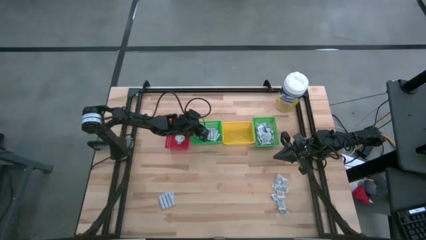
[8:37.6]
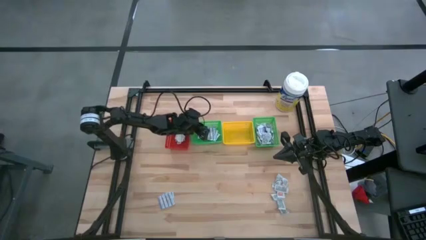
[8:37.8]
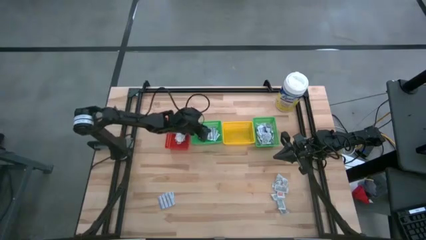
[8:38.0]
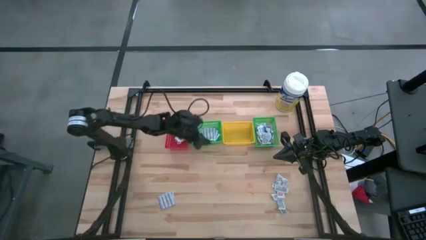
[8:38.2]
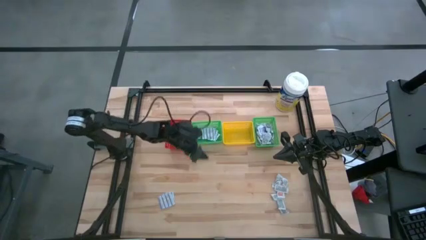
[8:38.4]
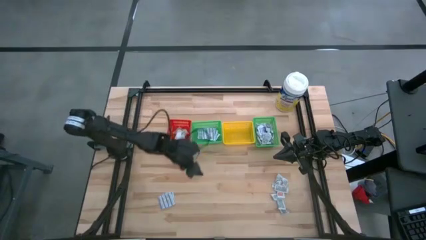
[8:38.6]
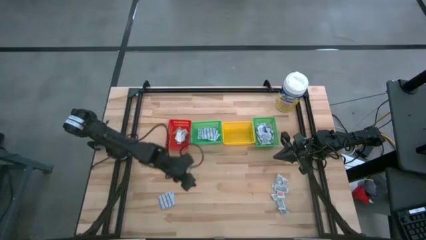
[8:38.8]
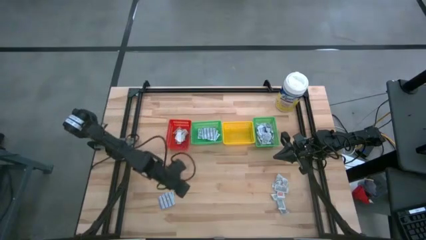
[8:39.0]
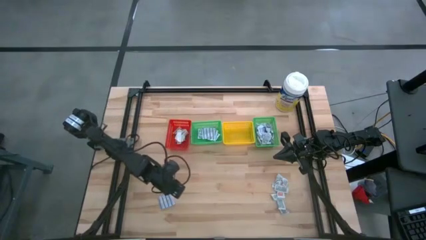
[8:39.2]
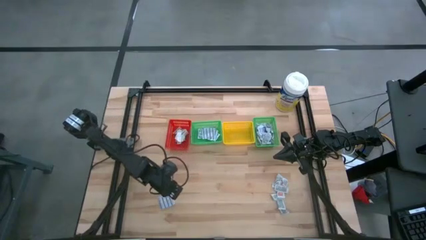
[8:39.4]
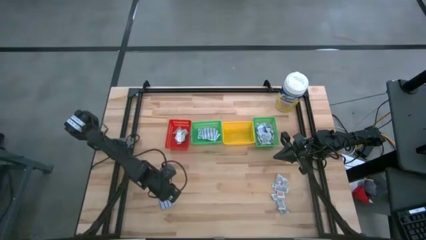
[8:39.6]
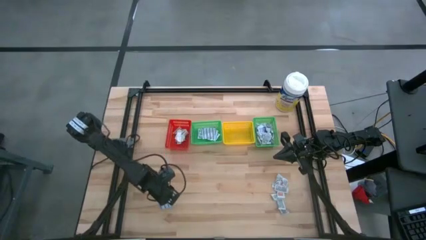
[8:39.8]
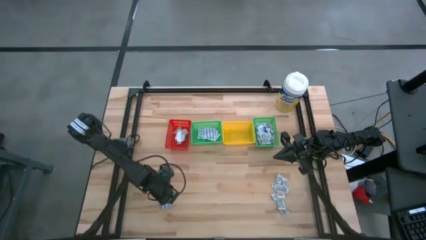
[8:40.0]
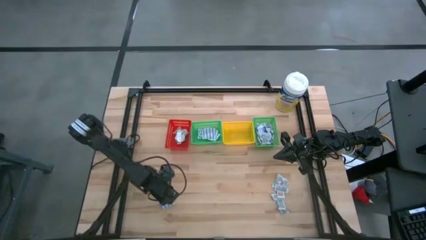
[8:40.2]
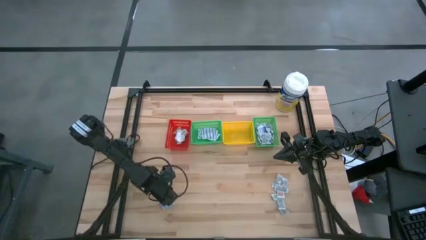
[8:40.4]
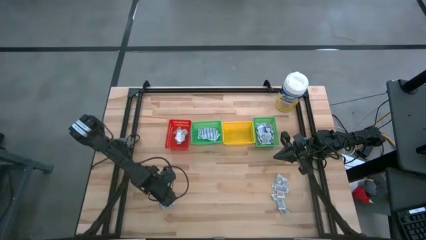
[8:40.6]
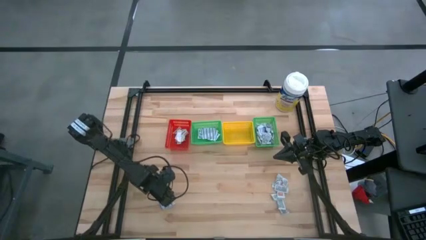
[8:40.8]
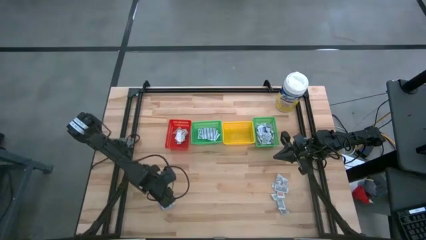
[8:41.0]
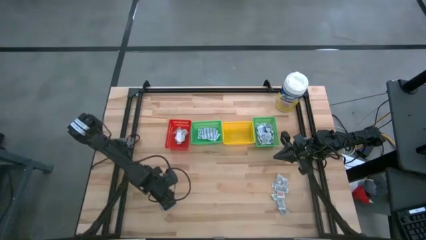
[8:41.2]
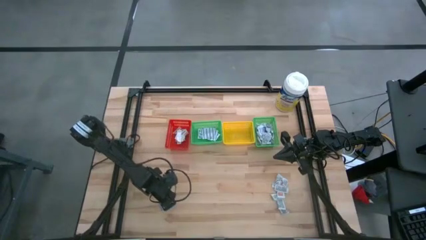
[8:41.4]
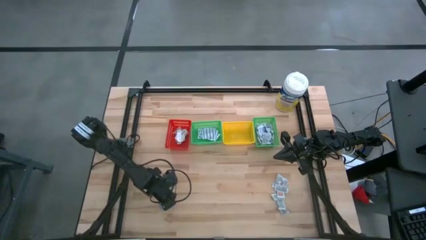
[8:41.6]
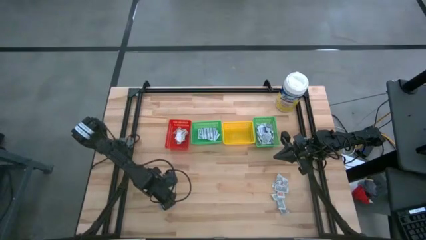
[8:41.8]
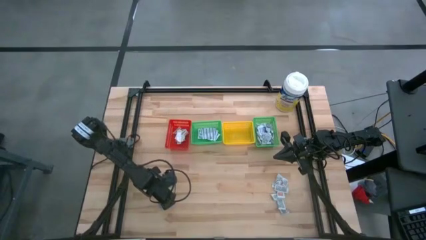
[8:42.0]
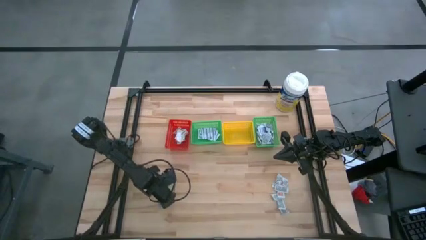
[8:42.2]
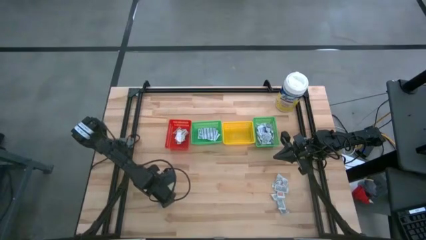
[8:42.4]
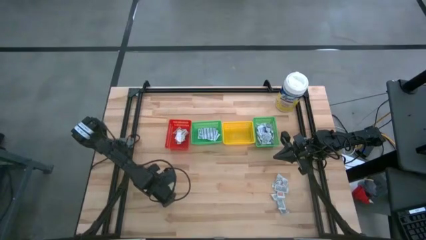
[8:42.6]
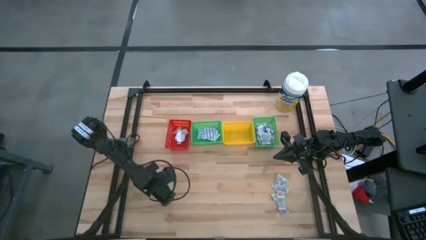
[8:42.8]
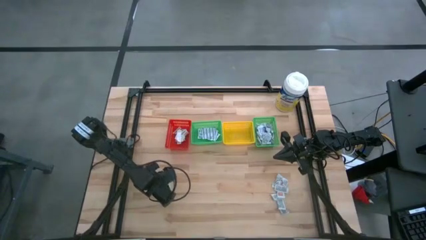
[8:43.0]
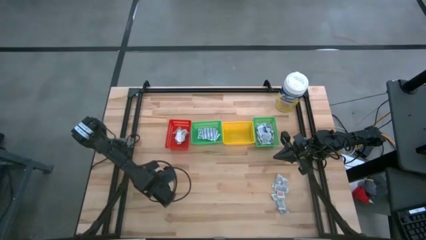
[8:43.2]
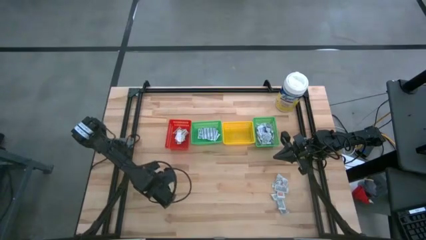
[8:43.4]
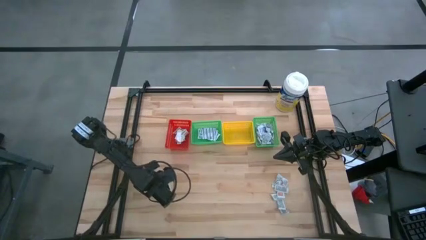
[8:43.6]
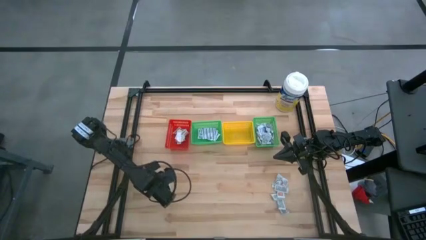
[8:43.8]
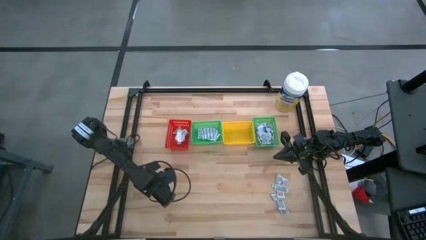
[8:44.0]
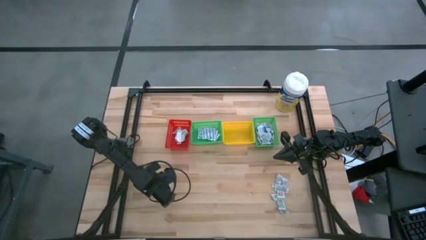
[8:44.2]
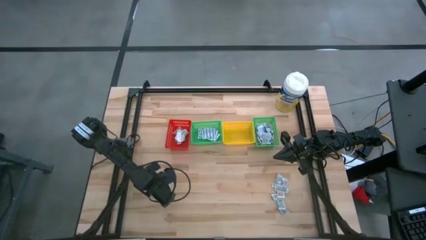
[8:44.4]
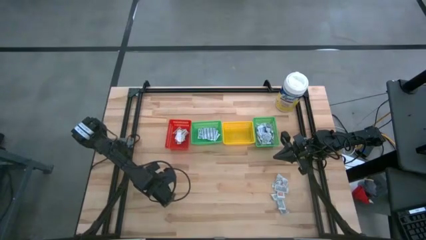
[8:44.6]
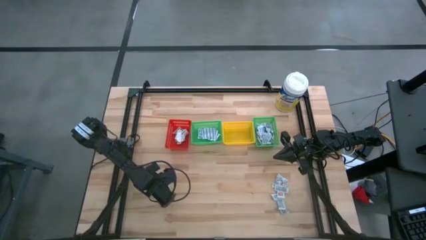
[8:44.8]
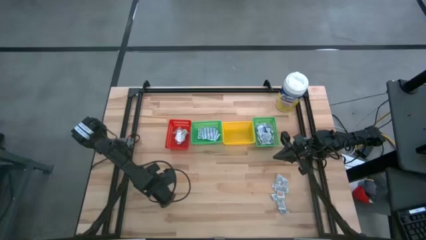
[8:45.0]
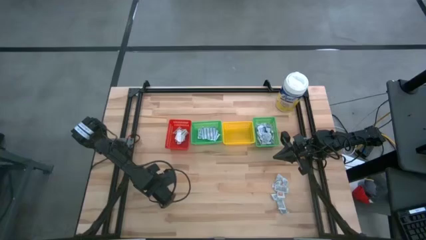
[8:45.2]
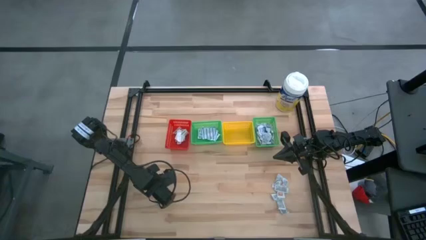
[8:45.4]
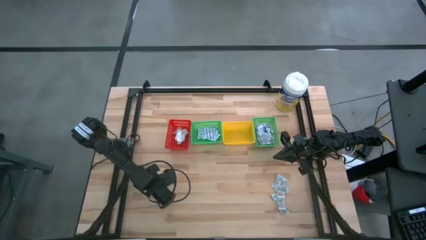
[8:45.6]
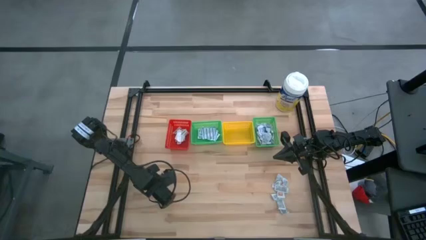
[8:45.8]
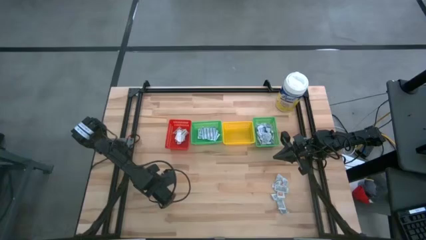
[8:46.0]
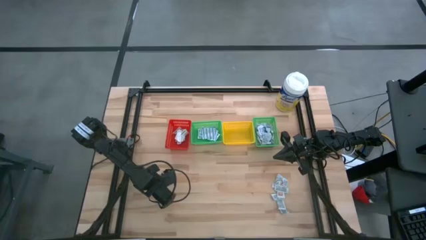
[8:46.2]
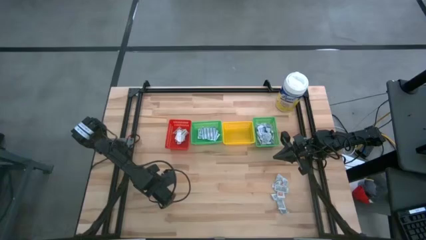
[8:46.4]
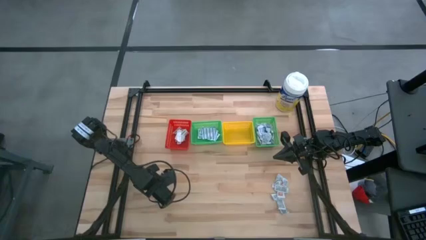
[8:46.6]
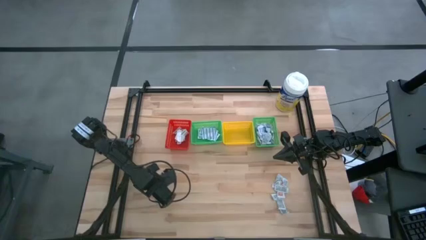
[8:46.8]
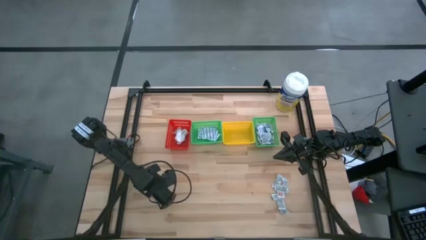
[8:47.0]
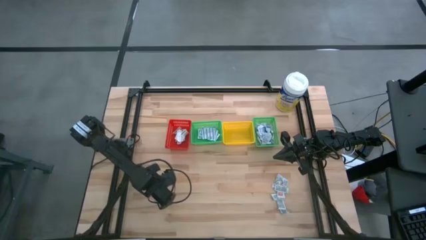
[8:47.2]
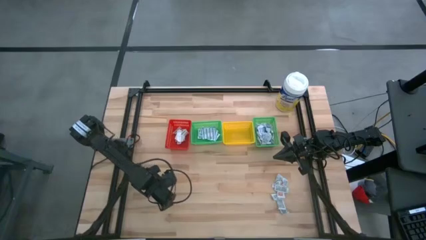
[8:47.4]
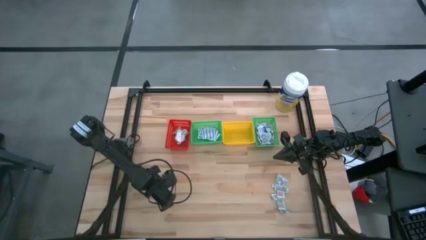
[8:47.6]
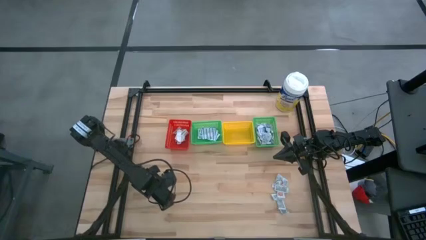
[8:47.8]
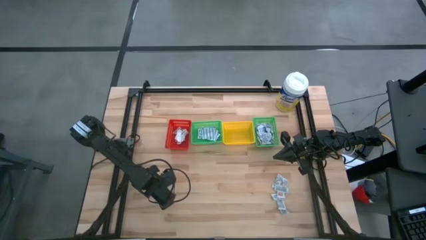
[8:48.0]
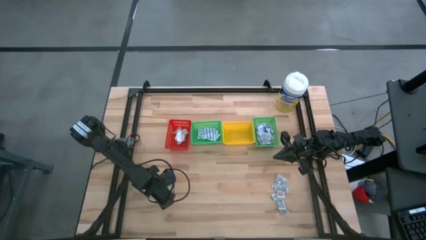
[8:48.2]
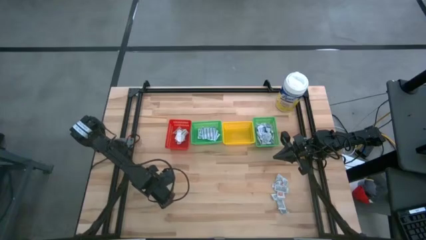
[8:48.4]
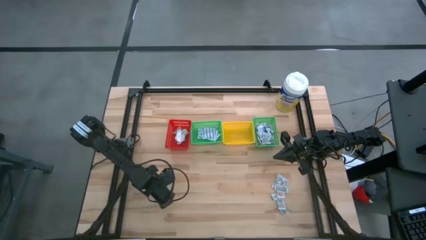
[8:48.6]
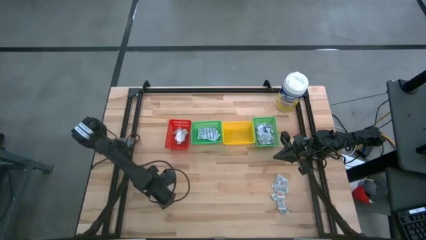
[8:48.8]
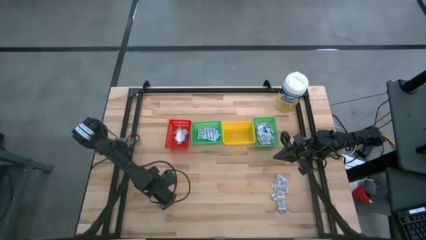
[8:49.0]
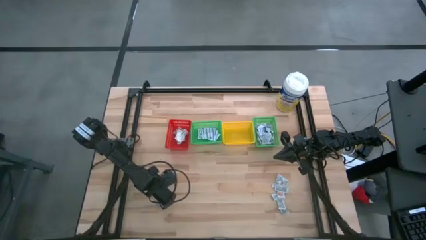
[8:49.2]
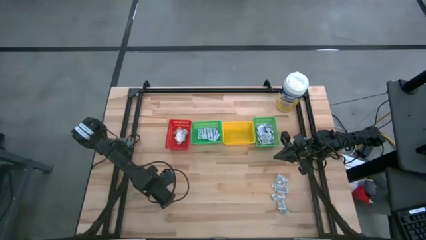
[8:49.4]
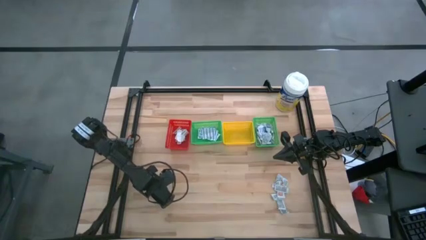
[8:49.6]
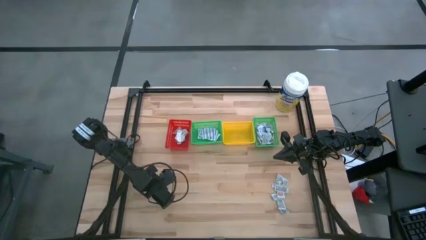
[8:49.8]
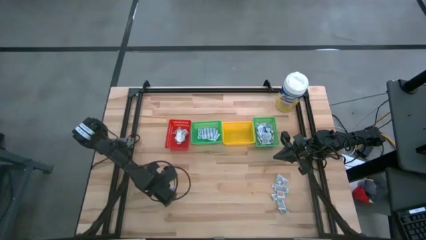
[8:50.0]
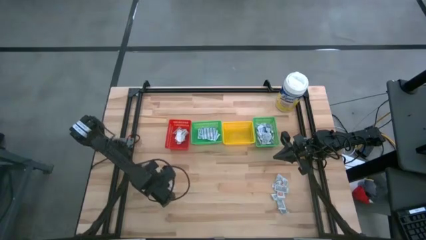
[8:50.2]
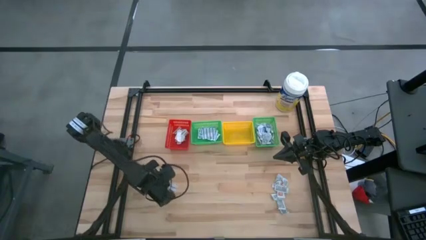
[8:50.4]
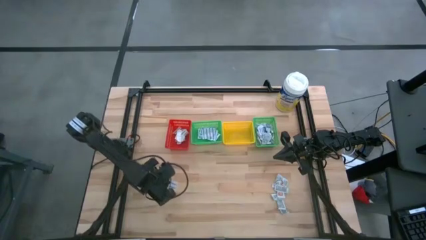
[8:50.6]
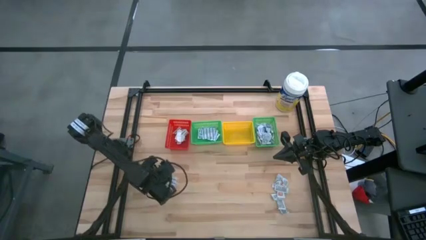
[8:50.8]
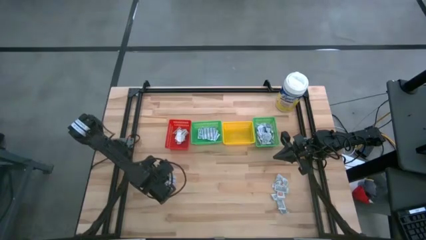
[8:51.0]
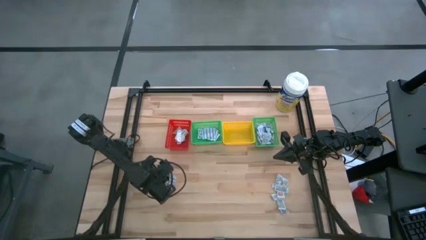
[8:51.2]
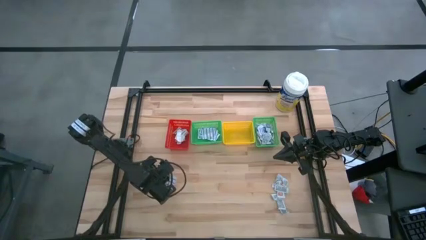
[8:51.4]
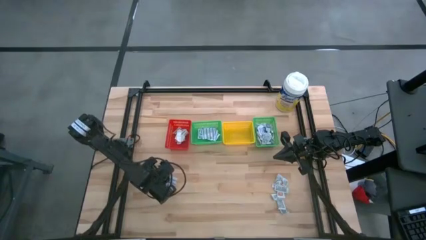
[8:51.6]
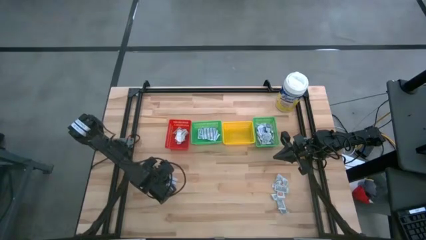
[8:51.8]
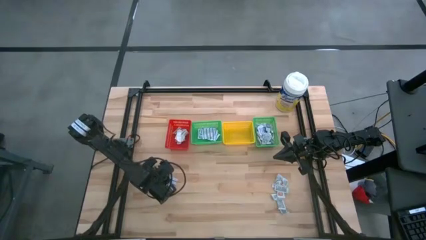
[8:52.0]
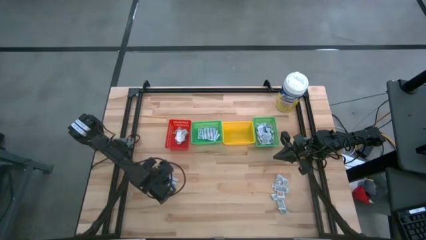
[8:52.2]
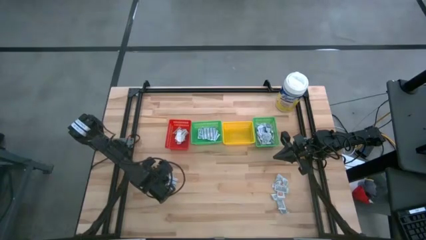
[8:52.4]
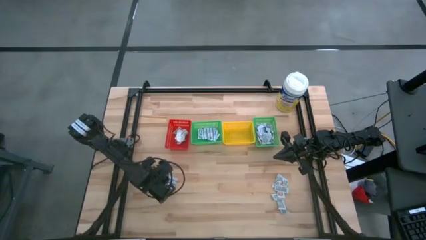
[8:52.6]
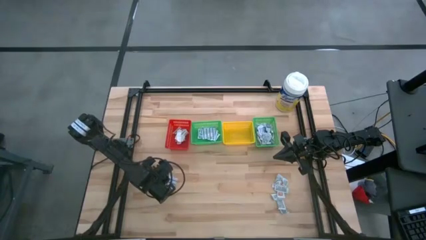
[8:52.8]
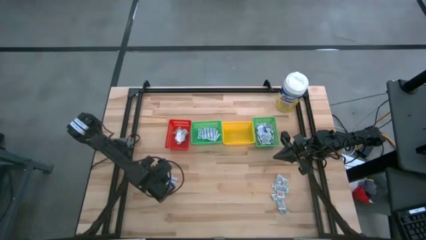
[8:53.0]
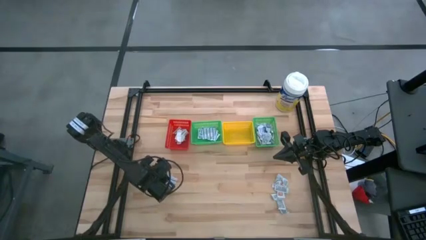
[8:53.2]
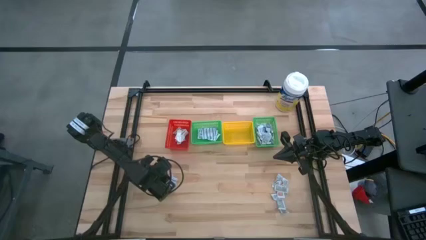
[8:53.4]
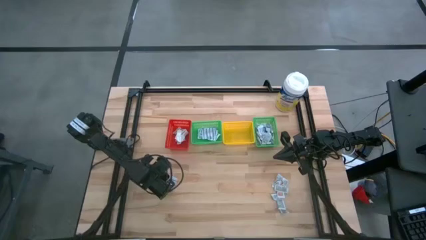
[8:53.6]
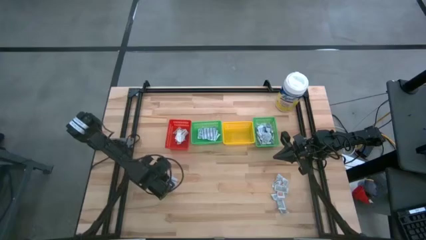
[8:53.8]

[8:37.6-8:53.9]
Task: Pick & Place First Aid Supplies
Put the blue bandage into the left green bin

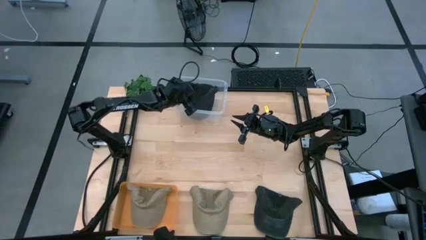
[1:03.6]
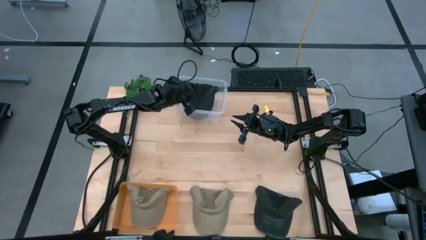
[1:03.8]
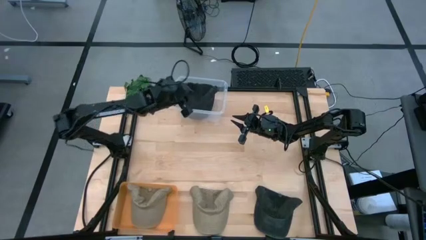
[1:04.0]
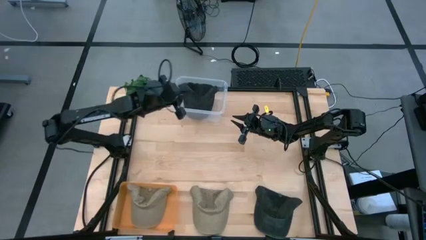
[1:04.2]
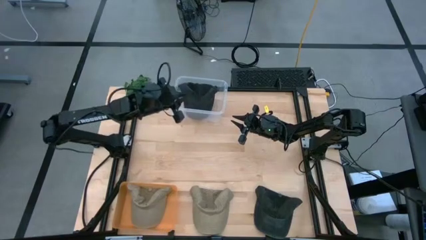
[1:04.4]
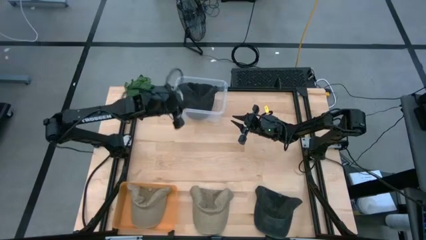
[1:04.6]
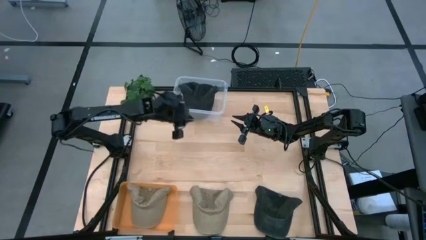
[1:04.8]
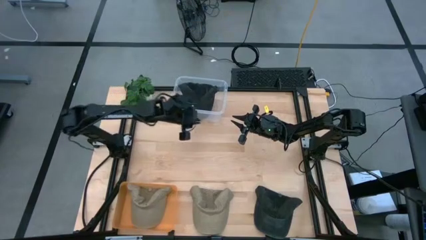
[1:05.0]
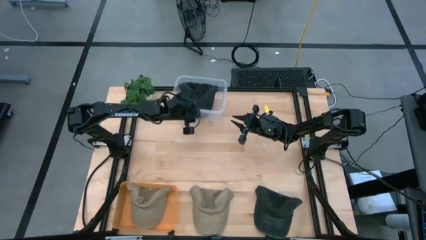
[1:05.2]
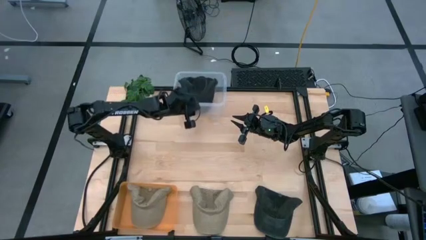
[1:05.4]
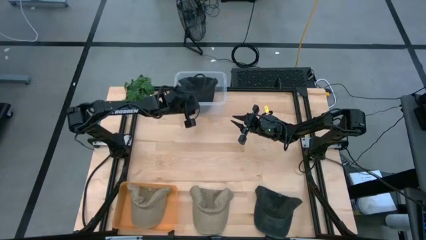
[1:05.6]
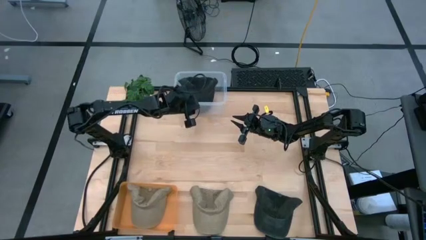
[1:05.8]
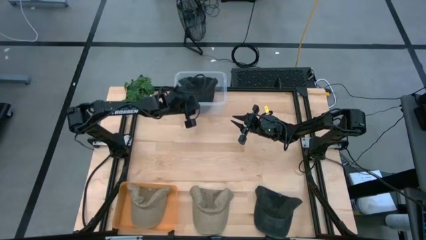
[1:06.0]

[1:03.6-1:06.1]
Task: Pick & Place hat
Adjust the transparent bin
